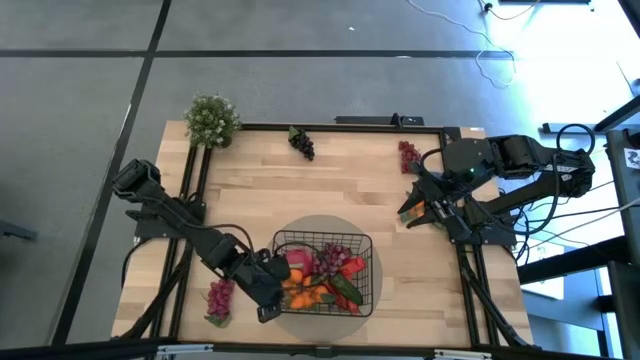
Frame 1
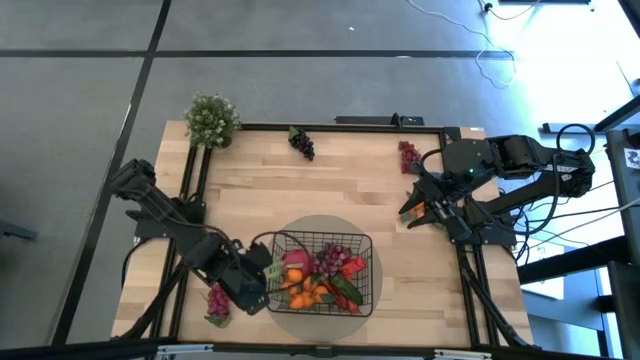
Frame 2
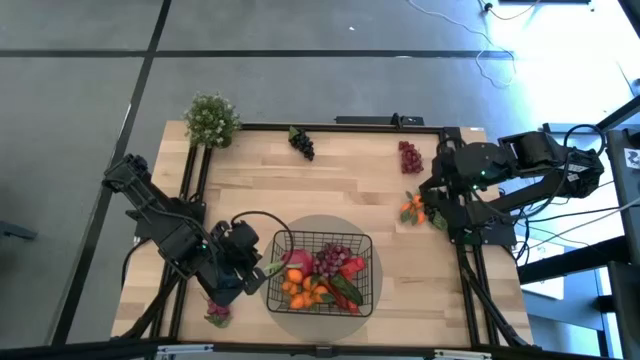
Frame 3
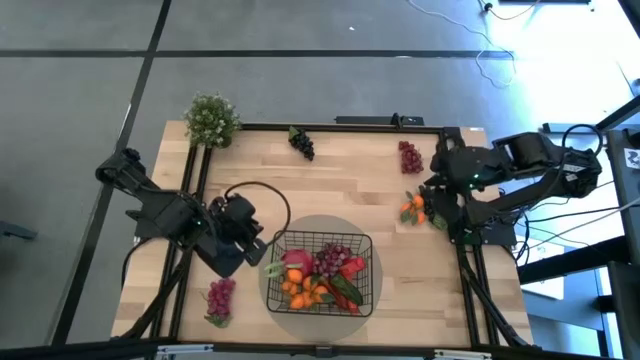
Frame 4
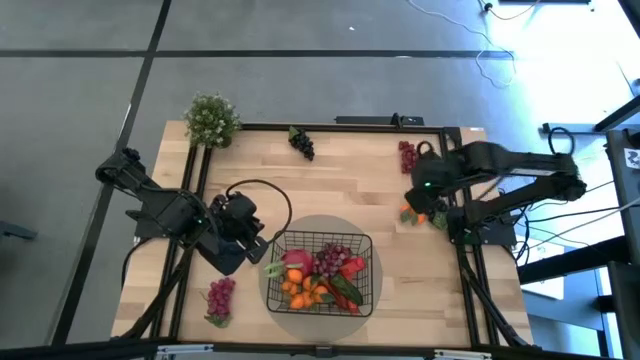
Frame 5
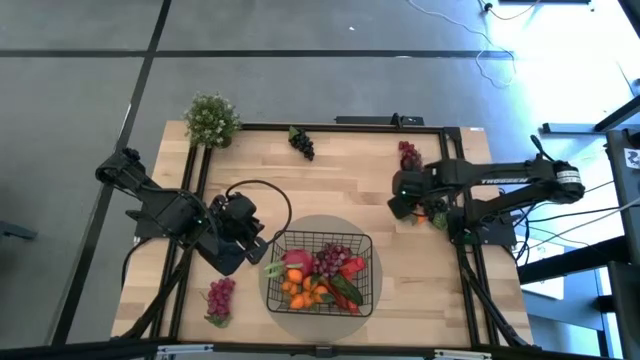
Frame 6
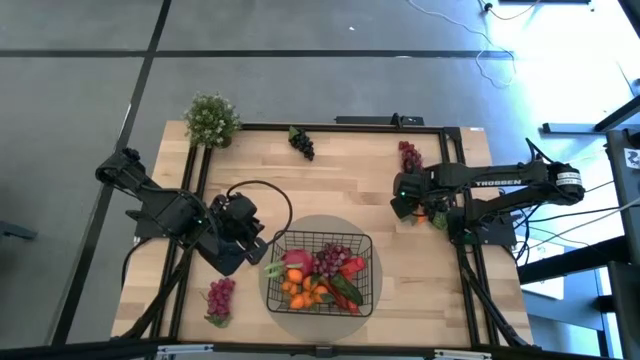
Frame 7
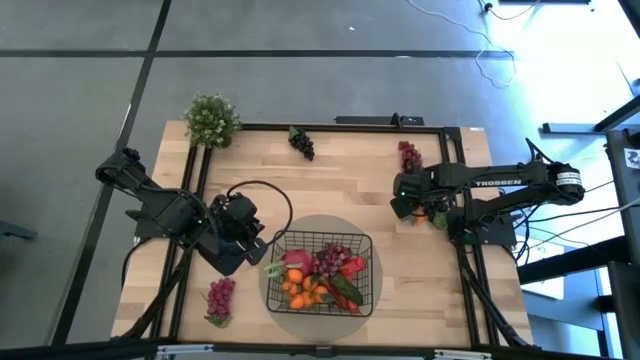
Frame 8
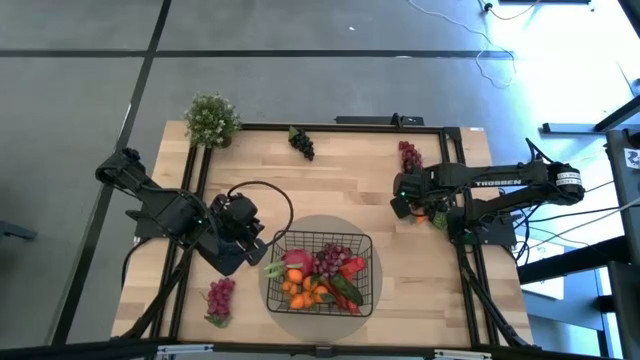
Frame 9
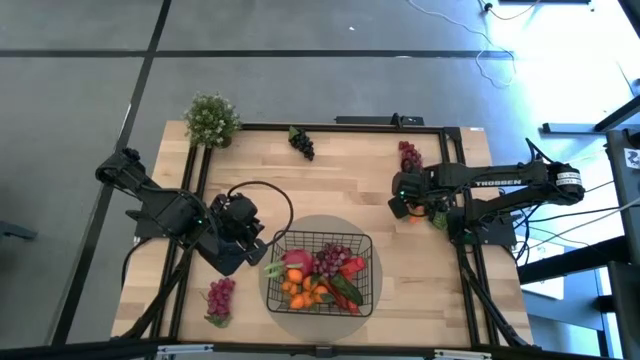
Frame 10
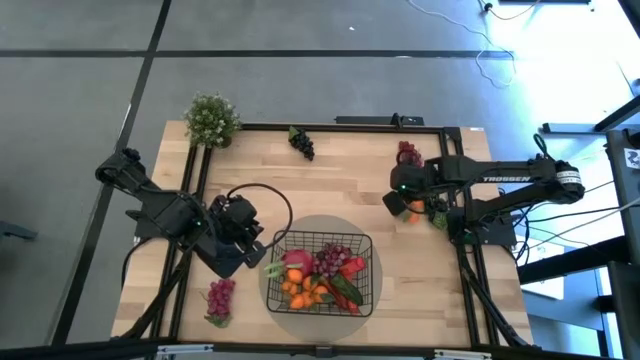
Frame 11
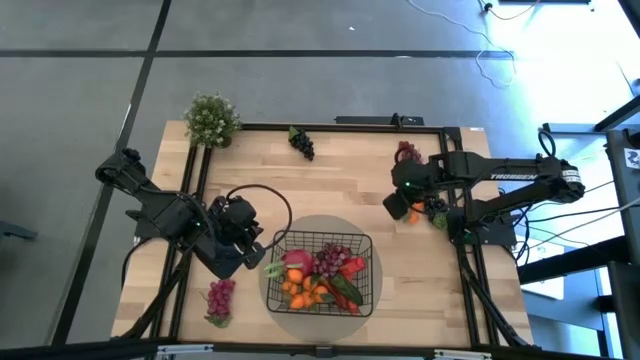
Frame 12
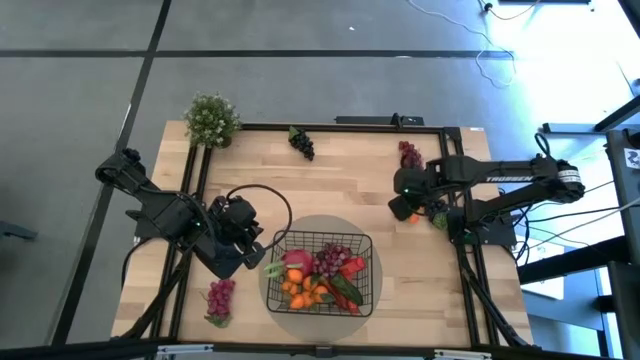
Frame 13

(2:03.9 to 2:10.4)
Task: Build produce basket
Put the oranges into the black wire basket

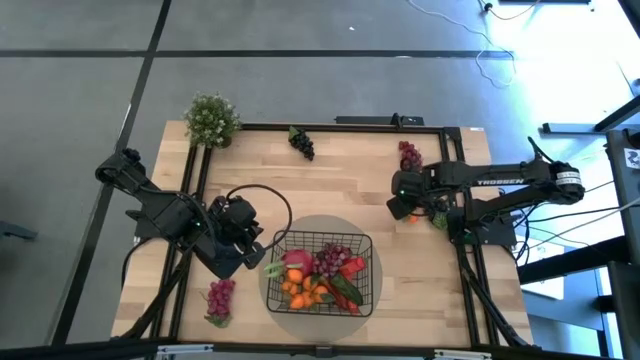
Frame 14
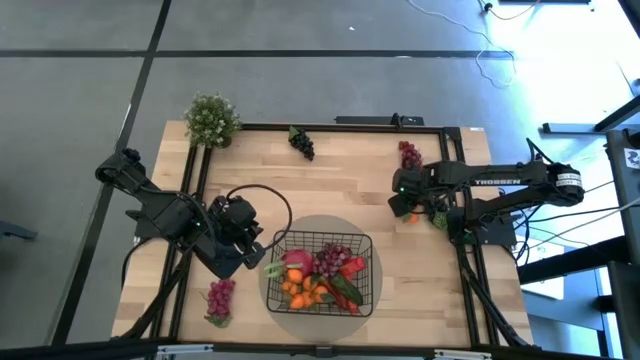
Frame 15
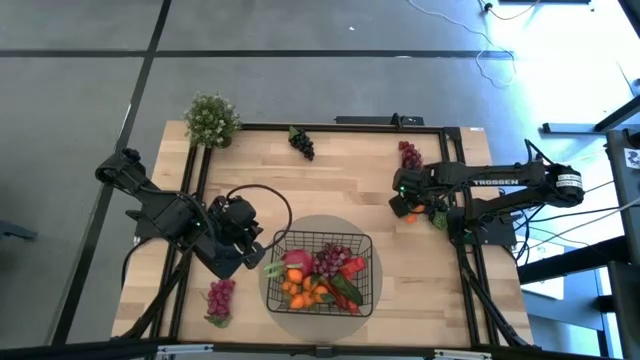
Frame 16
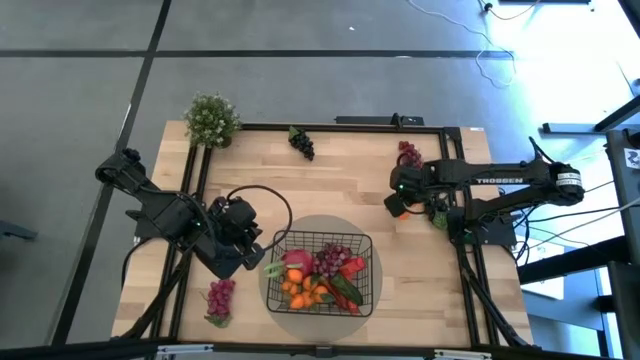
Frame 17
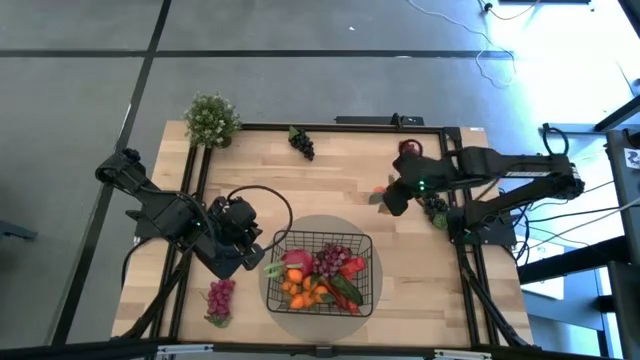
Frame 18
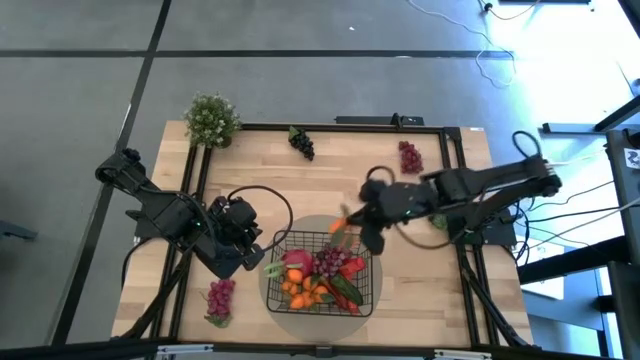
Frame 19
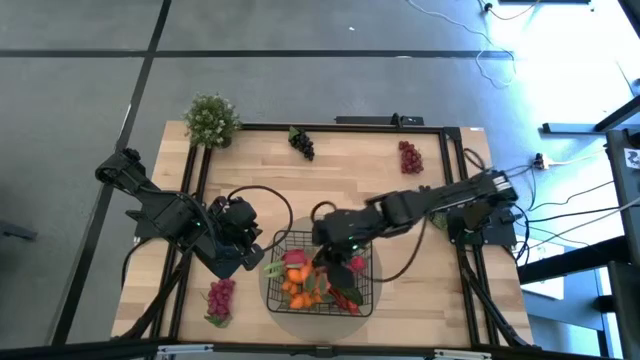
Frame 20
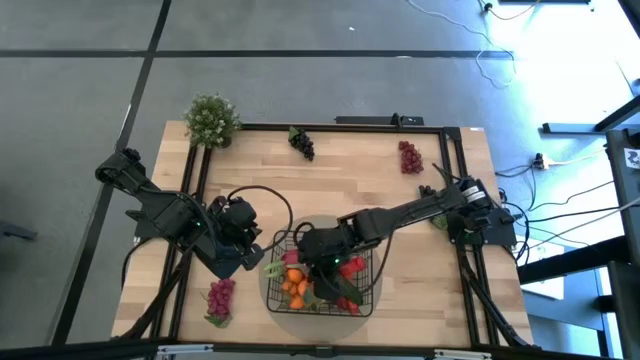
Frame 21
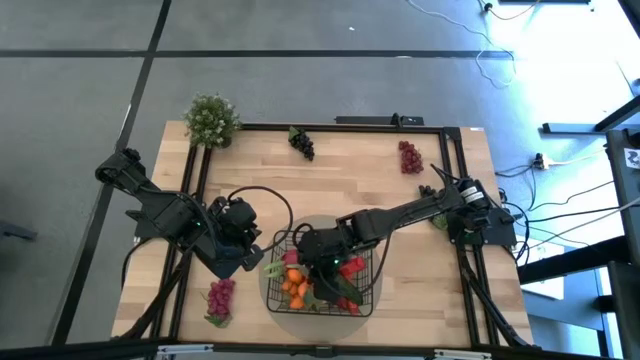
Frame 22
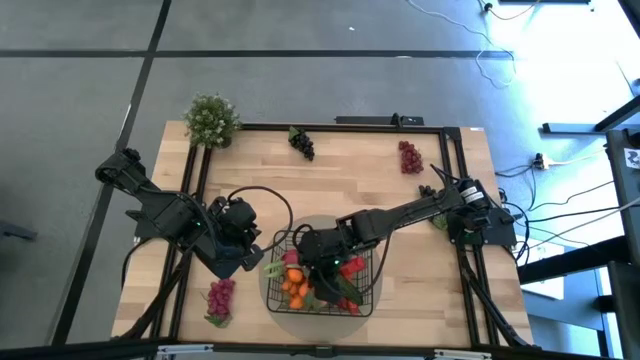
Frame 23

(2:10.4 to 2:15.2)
Put the oranges into the black wire basket

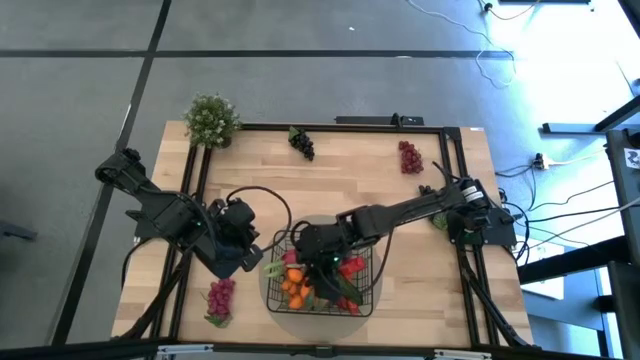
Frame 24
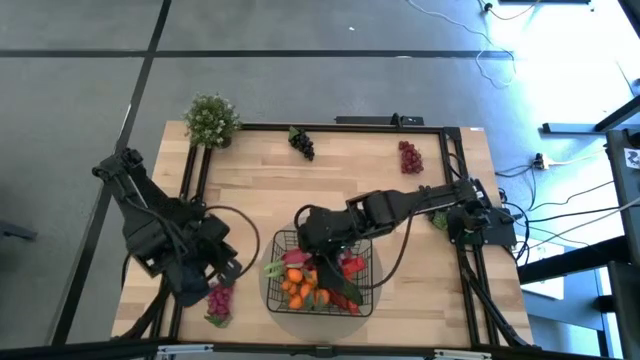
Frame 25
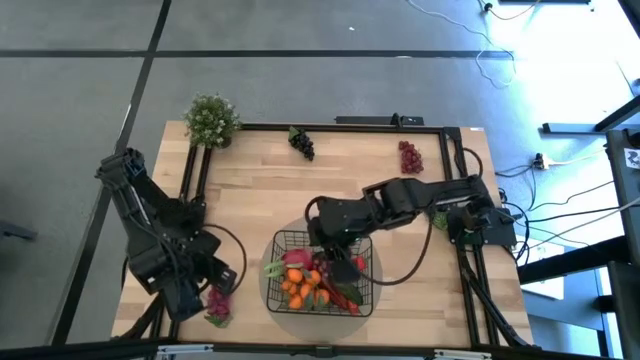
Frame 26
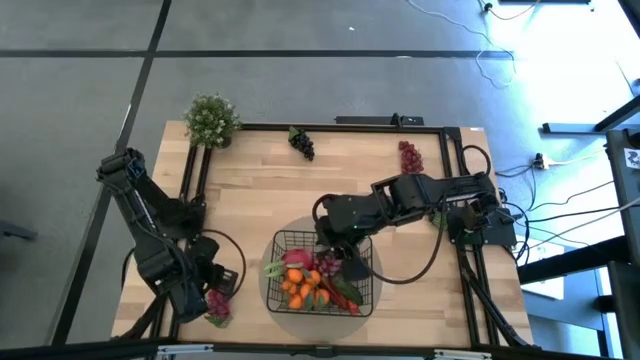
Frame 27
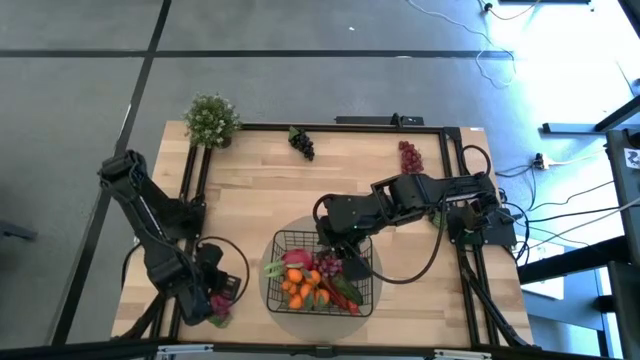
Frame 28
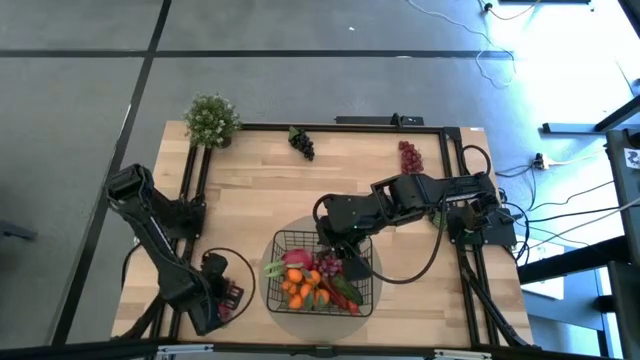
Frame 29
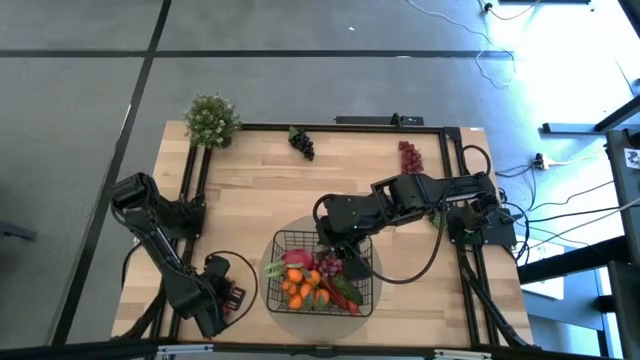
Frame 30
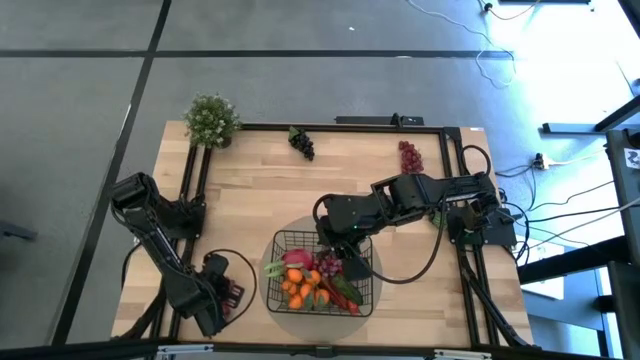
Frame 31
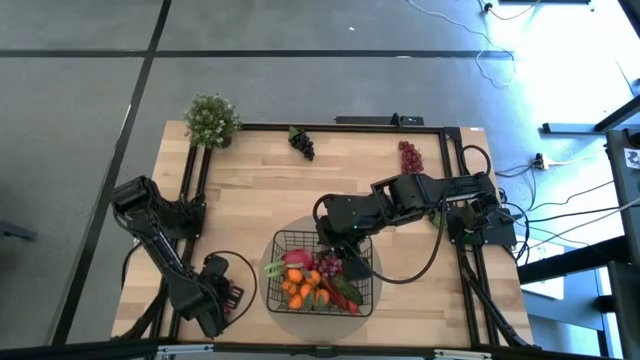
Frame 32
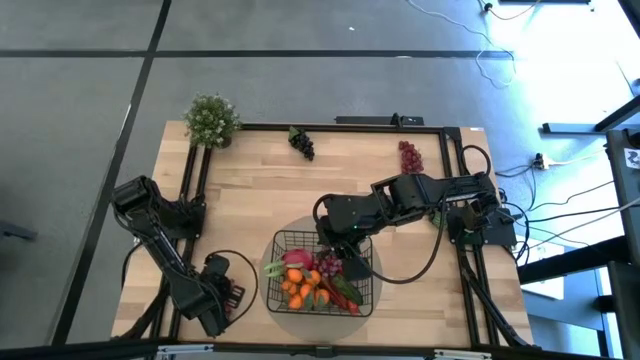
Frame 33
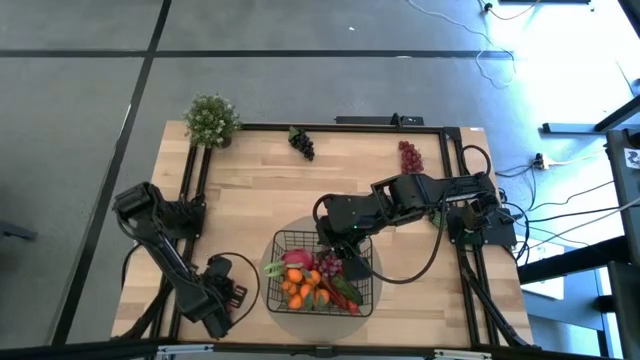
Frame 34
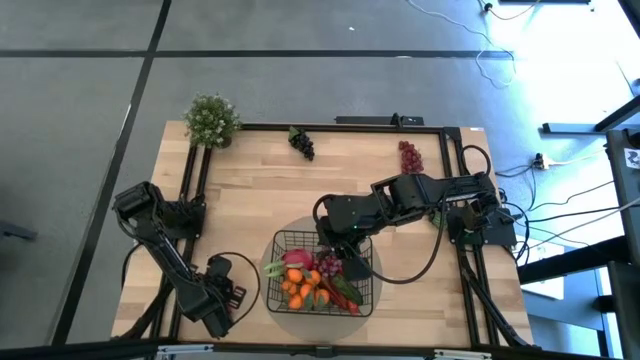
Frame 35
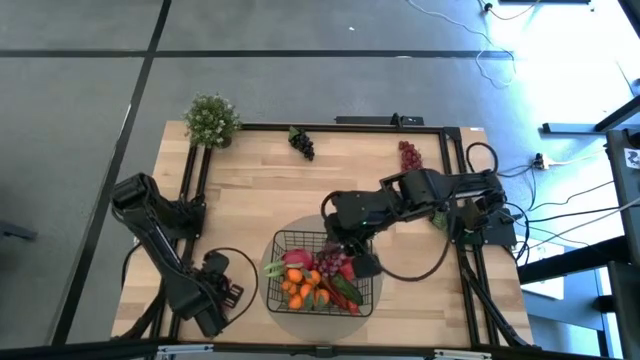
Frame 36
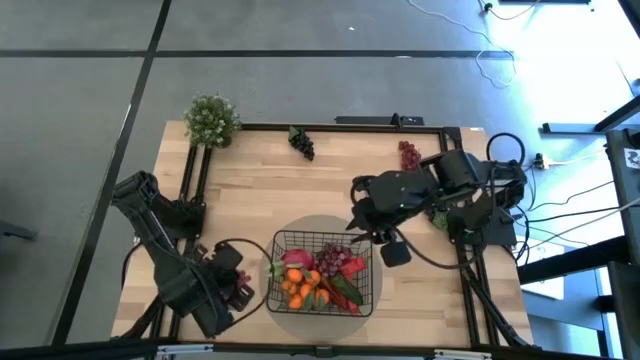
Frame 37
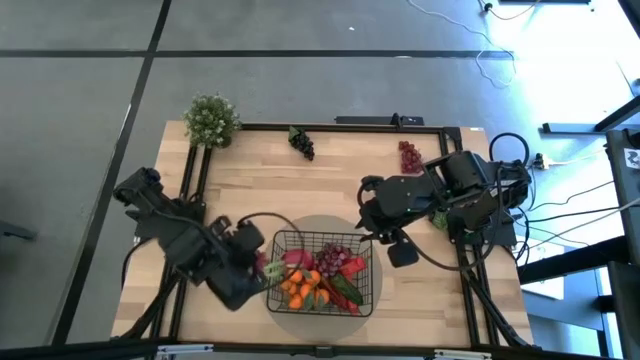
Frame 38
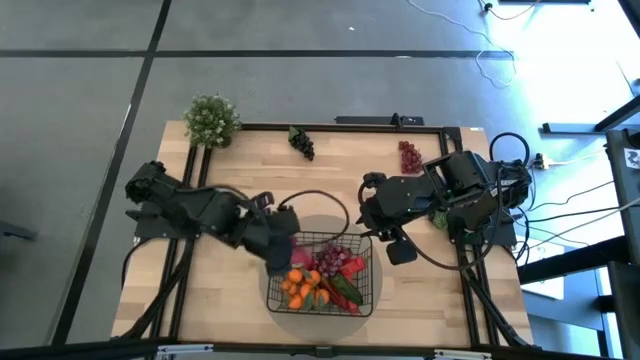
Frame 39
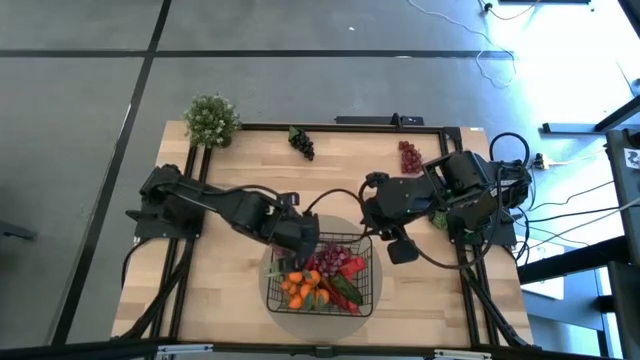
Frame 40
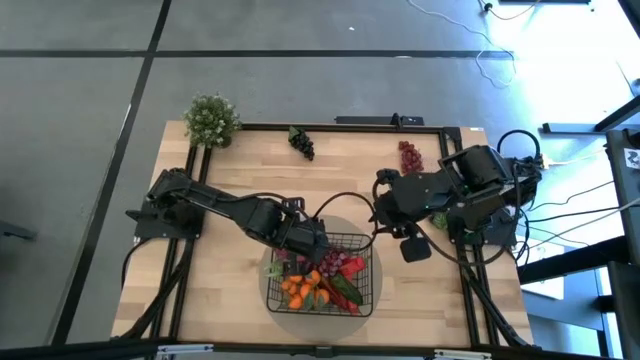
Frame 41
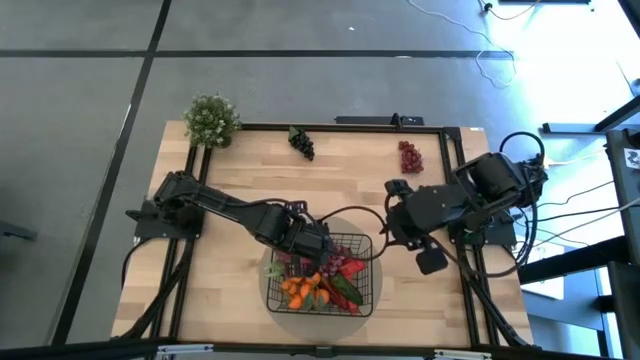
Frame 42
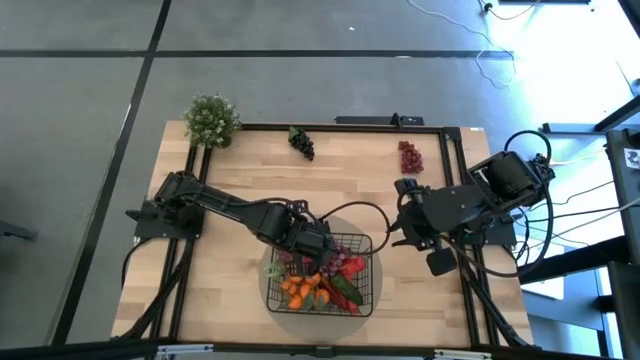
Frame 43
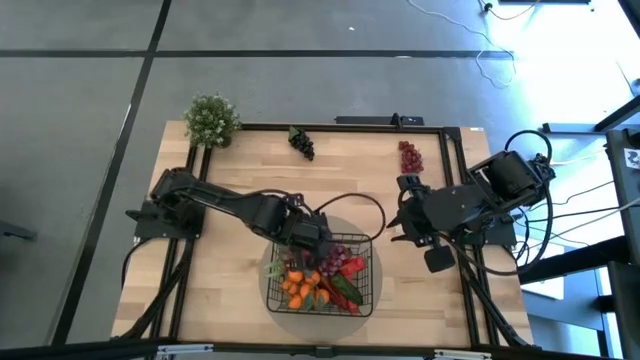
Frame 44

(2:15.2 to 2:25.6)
Put the bottom red grapes into the black wire basket
